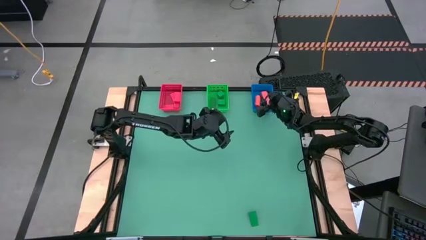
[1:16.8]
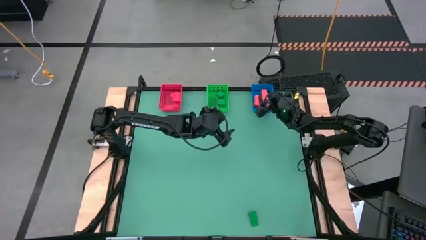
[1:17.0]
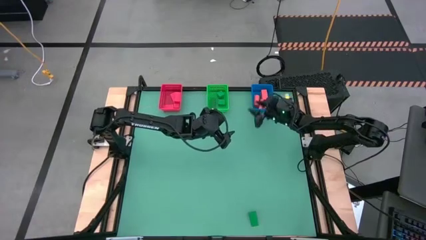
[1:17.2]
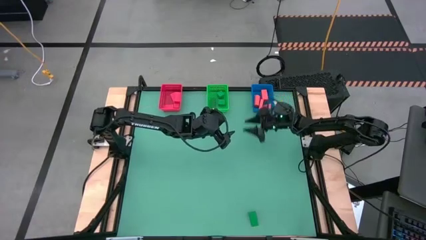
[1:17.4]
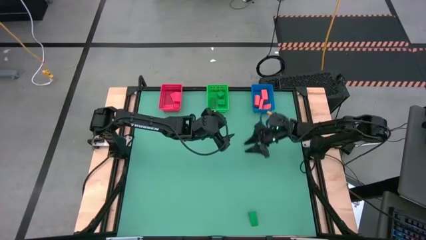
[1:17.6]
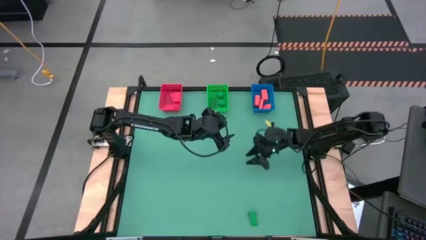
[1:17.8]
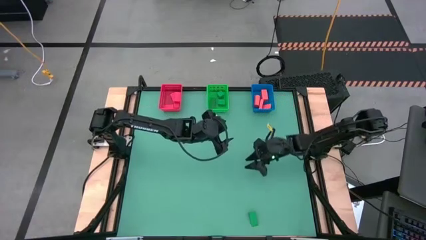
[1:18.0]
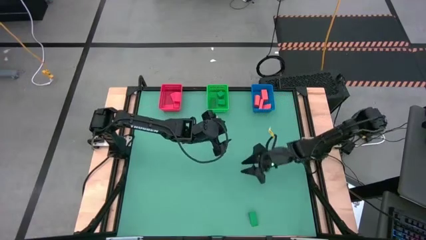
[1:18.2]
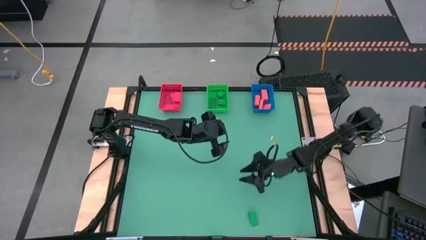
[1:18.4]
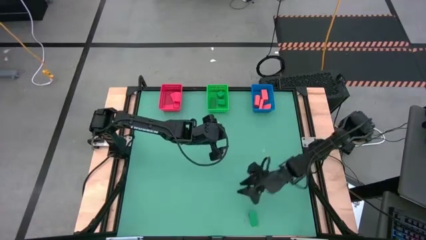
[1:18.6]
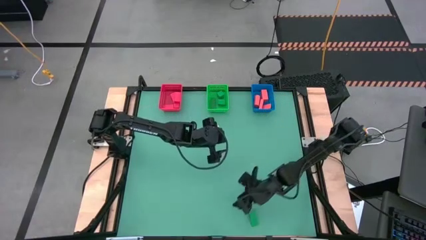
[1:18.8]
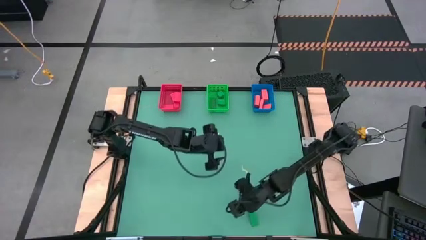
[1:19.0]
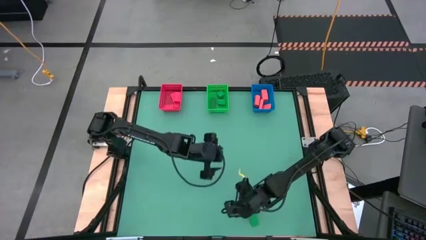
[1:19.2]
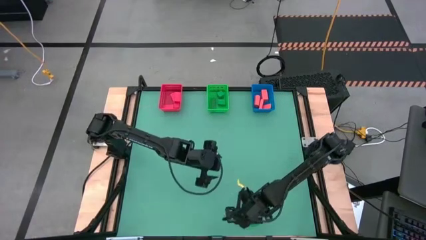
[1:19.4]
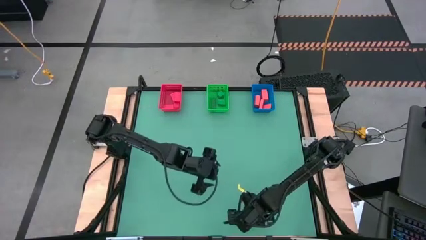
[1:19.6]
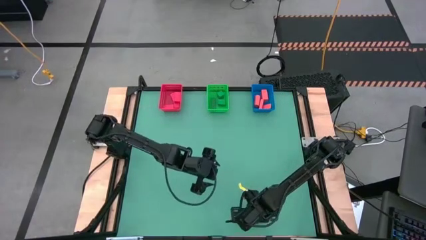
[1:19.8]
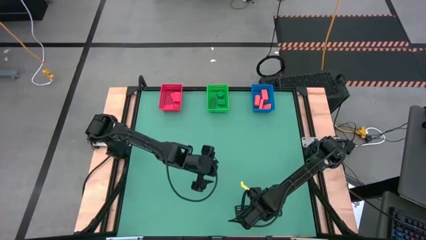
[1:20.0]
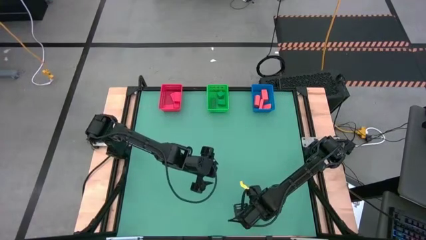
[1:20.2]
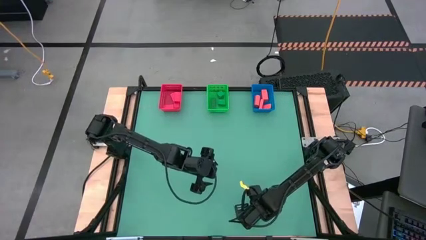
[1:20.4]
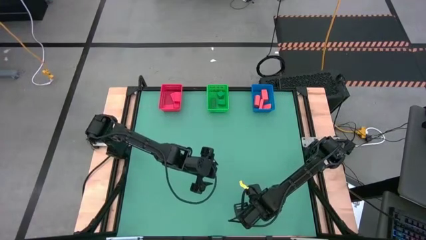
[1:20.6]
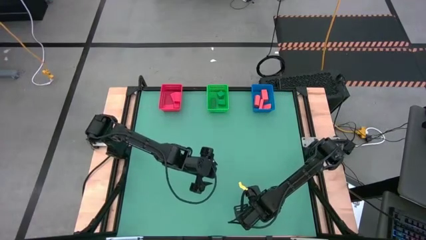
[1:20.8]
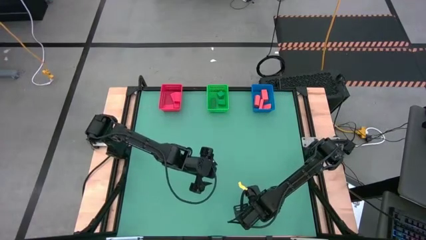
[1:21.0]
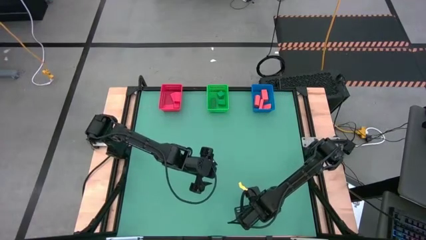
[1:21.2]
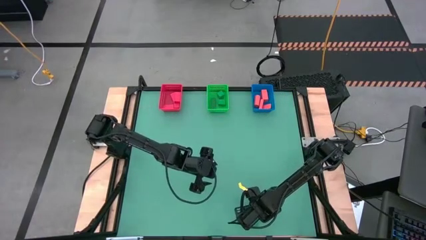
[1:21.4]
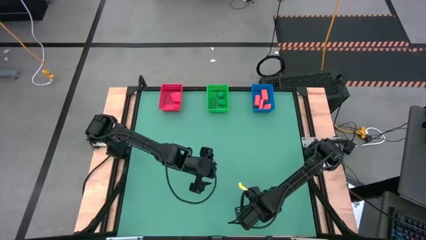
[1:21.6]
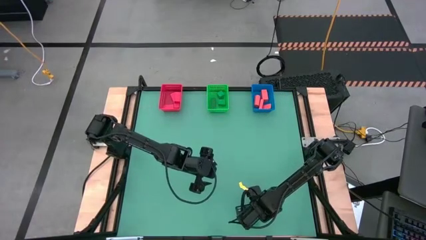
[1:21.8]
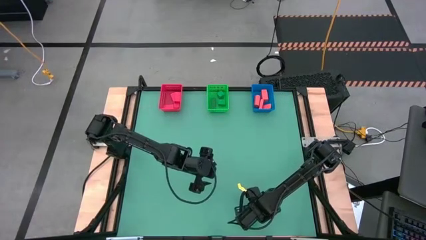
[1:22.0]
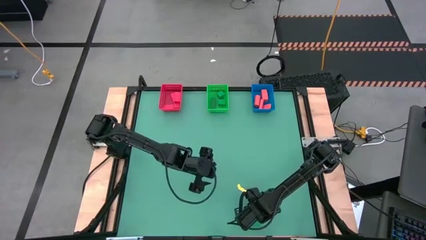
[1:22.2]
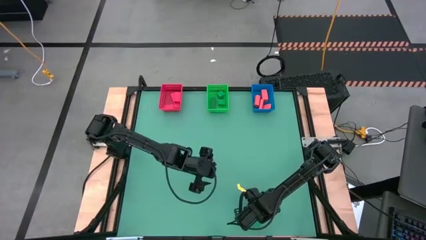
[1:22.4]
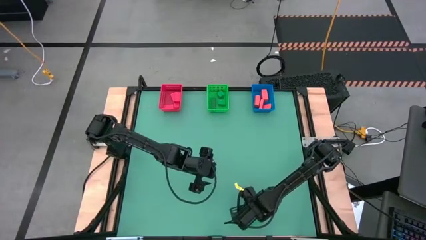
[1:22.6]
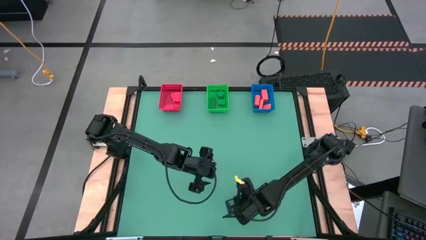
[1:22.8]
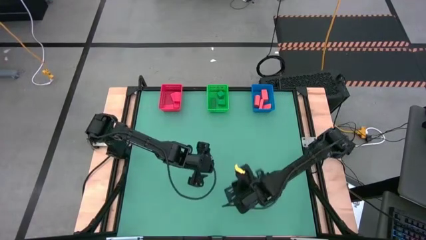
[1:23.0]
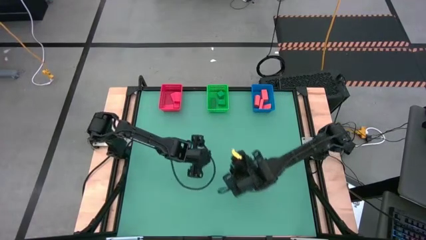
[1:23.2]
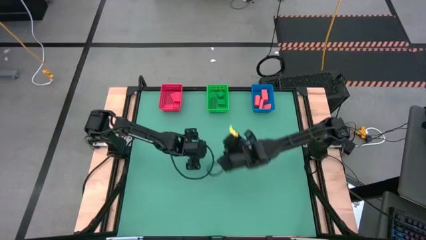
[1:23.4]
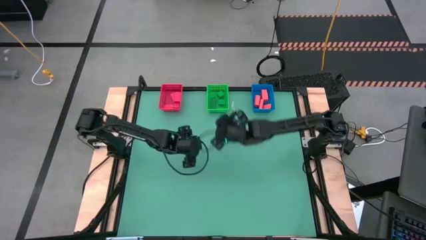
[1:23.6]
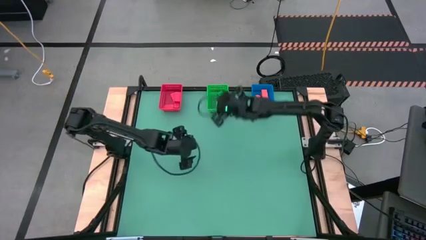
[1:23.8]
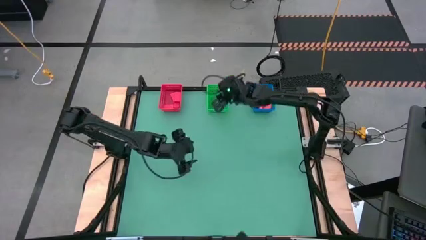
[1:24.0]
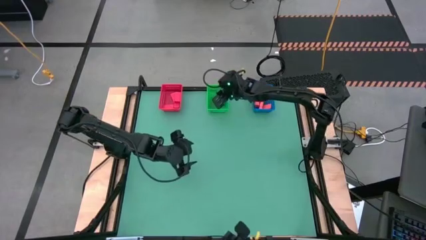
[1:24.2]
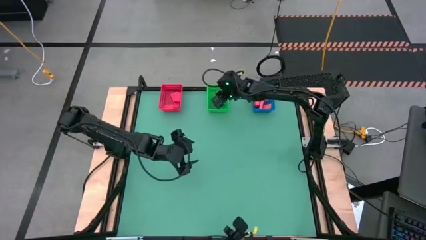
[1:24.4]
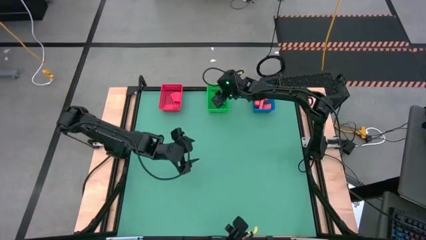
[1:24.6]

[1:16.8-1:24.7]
Task: Sort & place blocks by color
Put the green block into the green basket

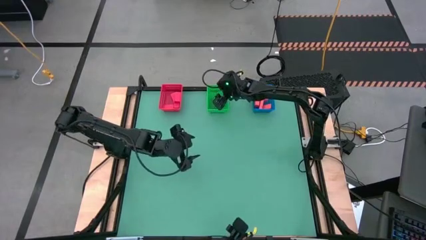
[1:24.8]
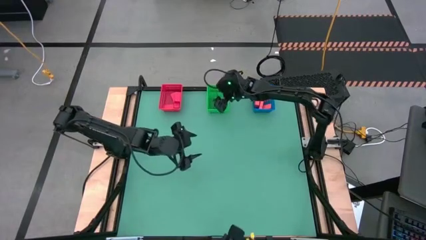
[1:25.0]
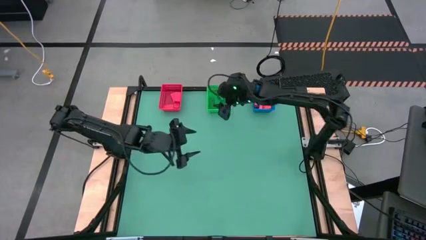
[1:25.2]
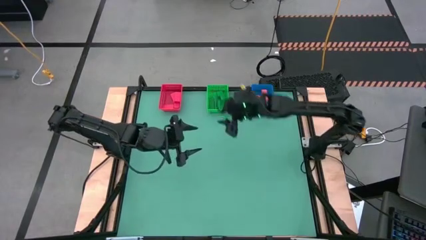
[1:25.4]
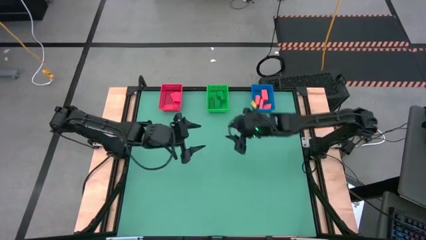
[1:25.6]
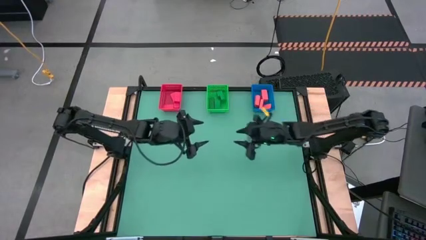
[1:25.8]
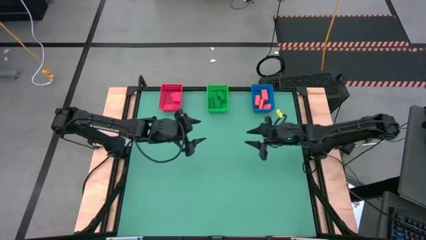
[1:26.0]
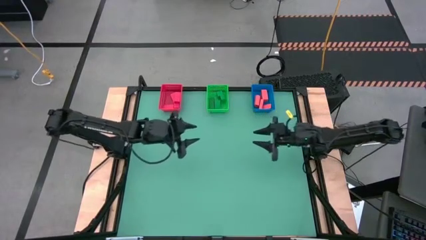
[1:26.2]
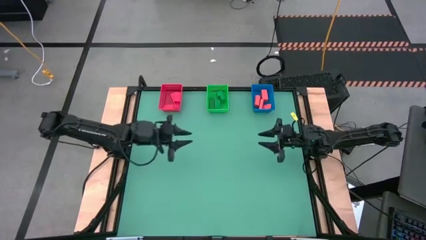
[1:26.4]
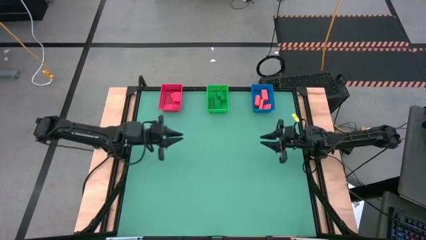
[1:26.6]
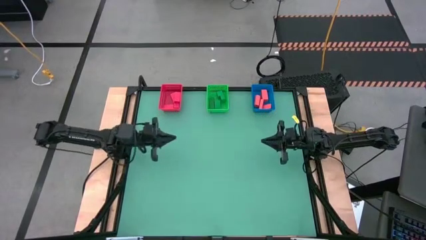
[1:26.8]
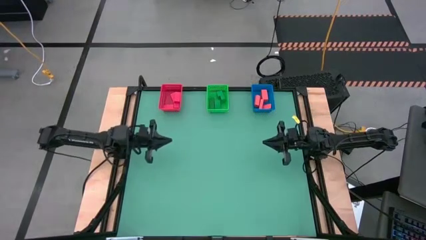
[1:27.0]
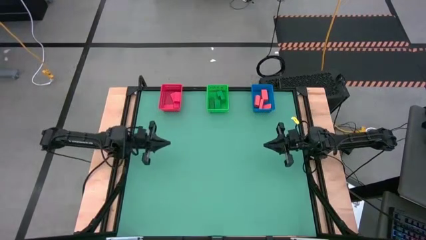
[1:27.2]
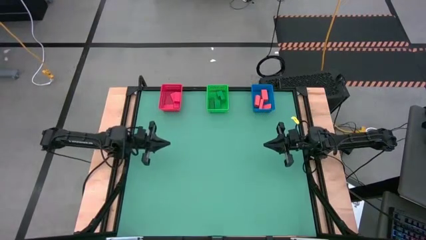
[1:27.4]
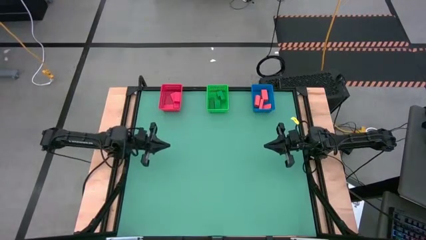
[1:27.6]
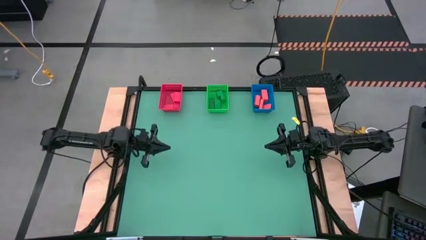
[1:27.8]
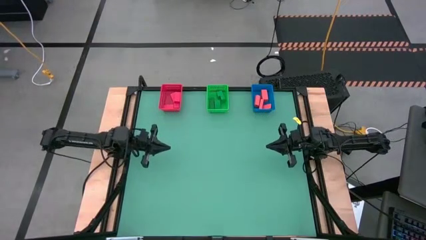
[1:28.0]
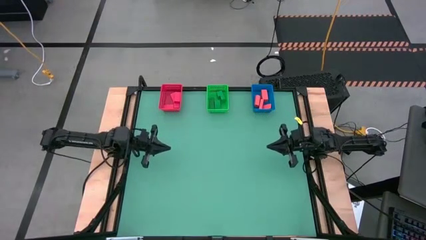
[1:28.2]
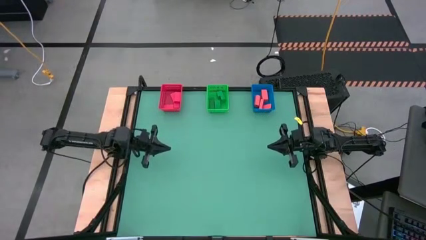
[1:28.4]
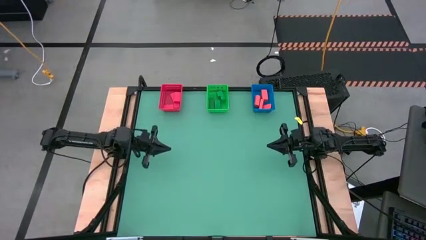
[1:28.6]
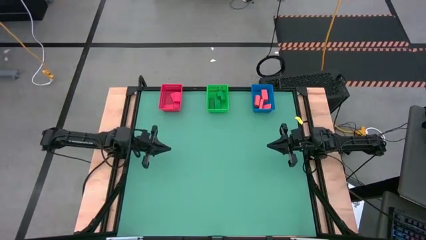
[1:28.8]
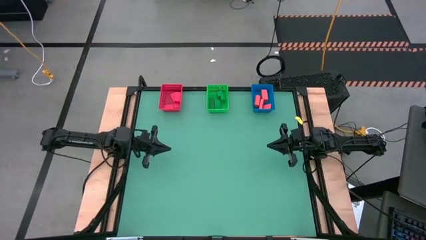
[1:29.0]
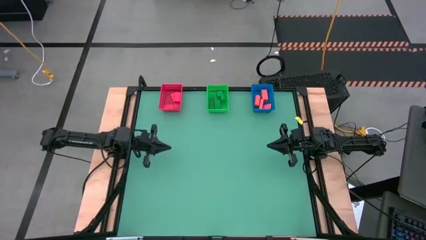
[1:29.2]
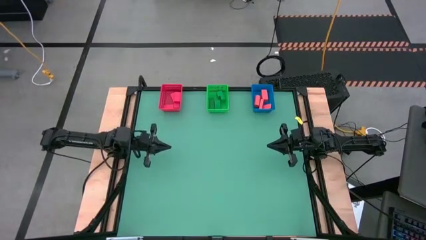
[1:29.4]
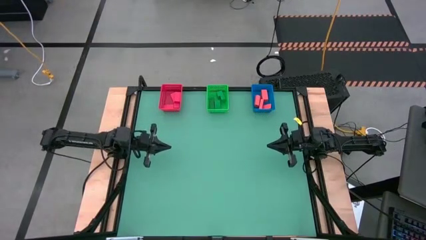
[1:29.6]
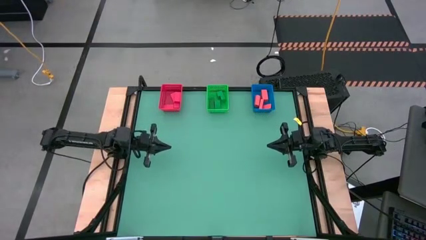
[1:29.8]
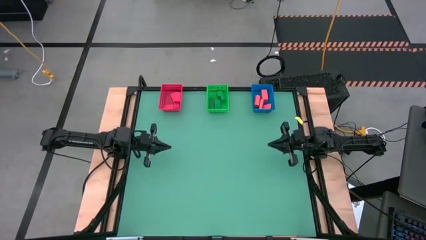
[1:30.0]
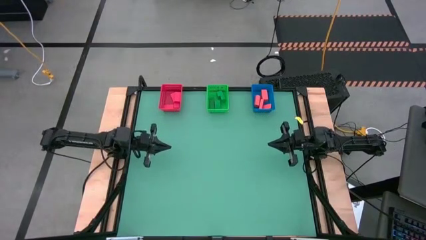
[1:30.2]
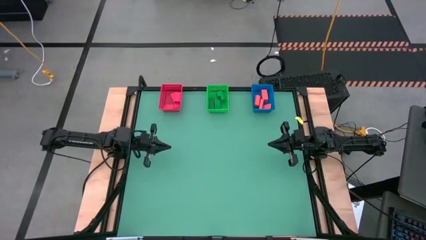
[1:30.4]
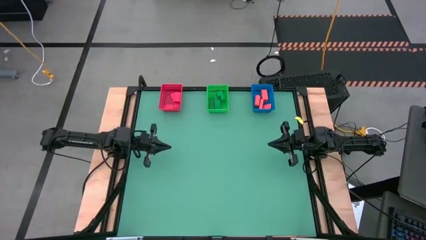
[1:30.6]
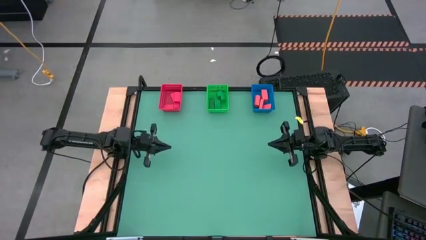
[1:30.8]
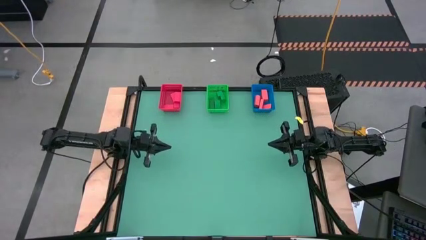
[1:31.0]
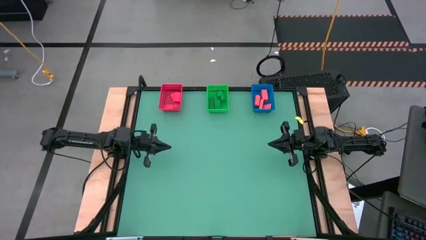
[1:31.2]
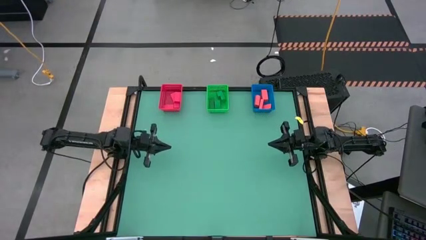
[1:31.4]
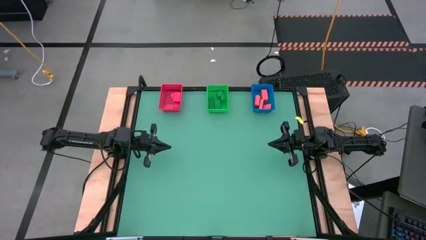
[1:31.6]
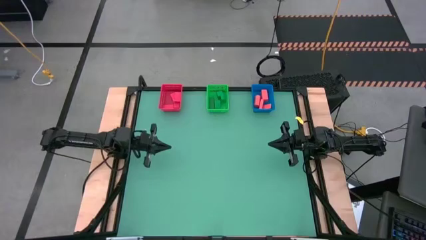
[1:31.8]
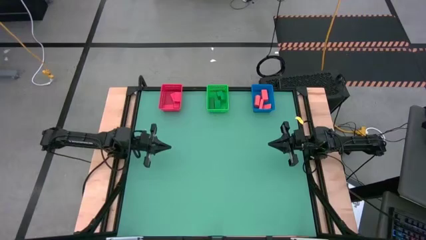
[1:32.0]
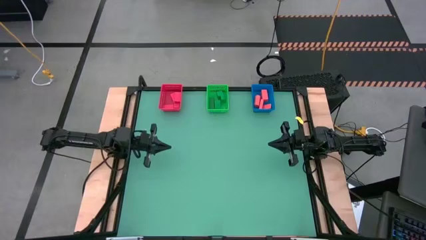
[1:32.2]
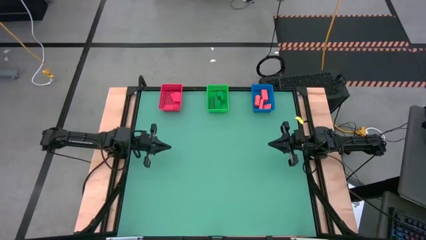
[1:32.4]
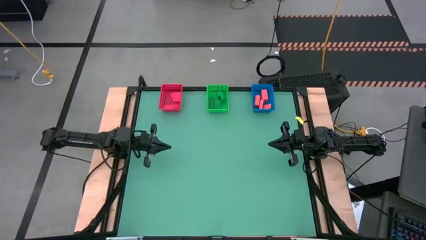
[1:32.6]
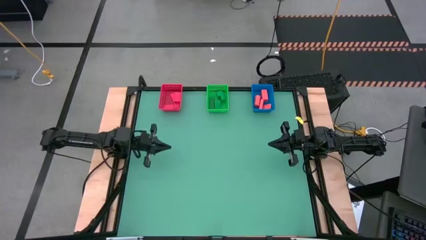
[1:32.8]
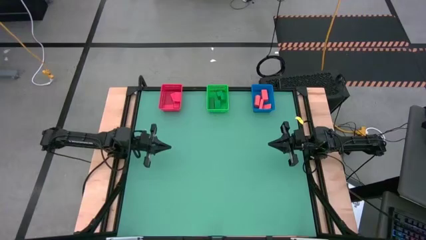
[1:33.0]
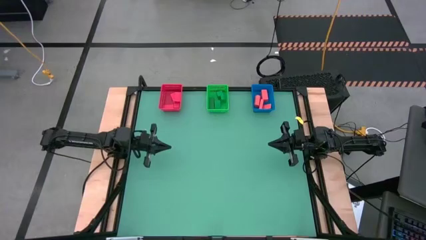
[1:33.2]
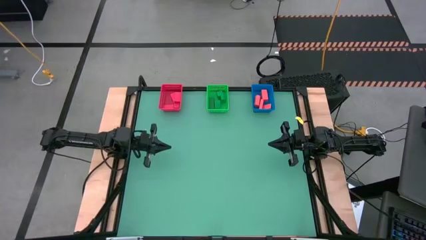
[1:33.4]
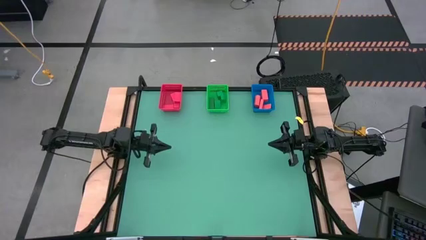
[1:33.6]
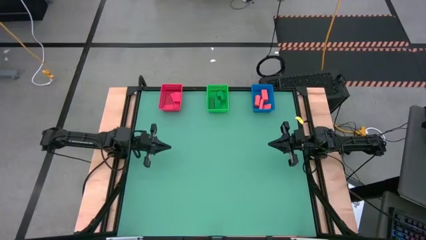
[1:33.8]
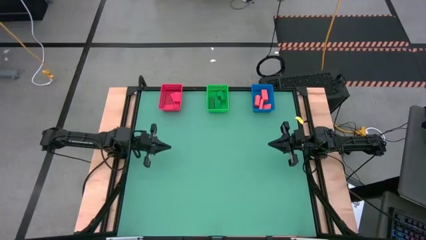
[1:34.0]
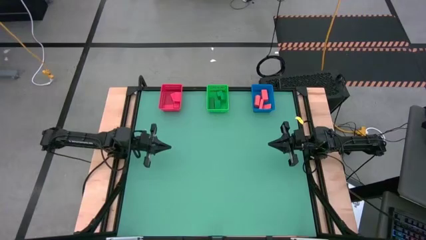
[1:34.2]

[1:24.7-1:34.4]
Return to Home Position
